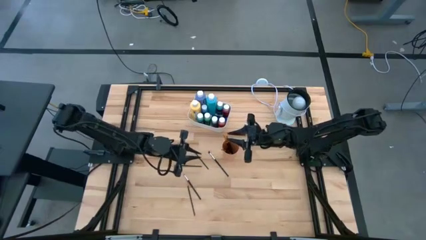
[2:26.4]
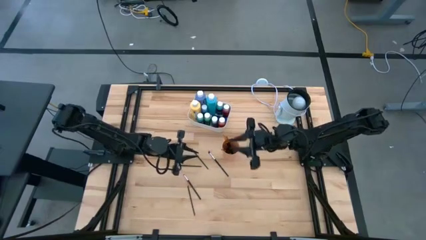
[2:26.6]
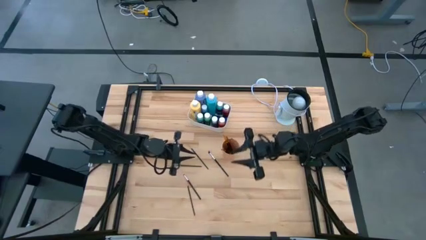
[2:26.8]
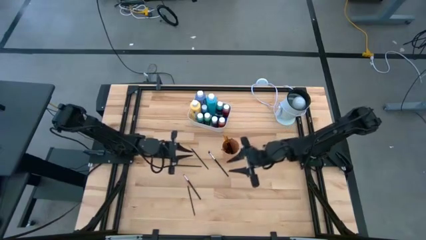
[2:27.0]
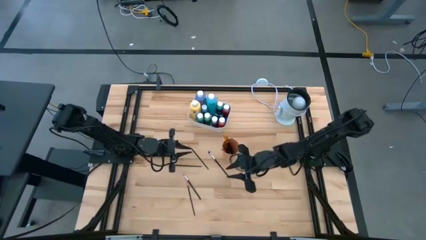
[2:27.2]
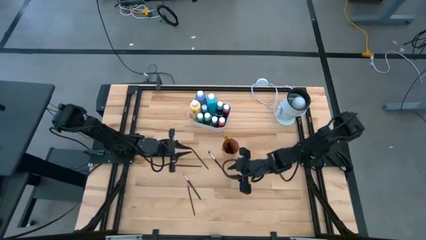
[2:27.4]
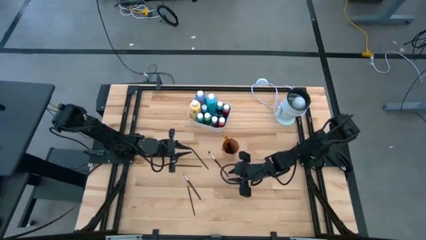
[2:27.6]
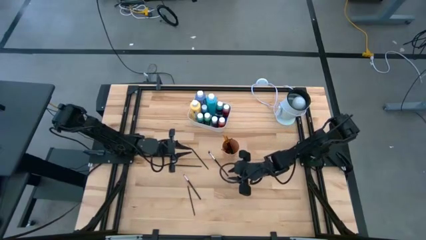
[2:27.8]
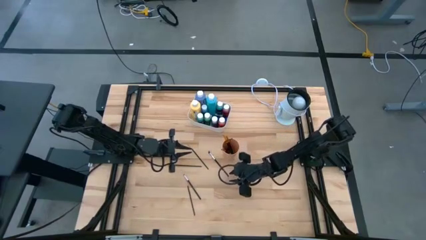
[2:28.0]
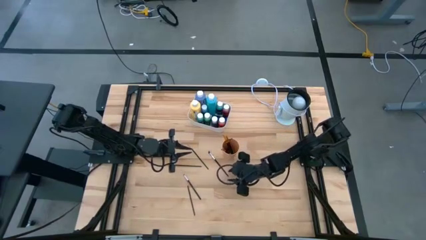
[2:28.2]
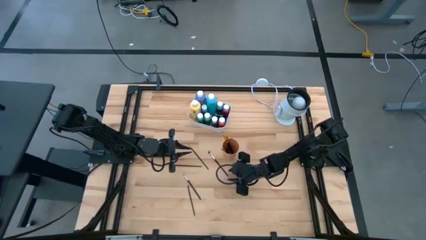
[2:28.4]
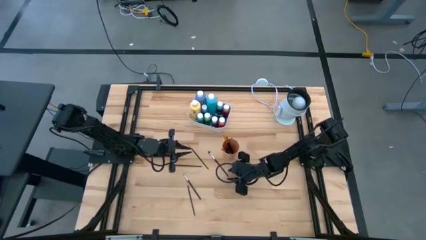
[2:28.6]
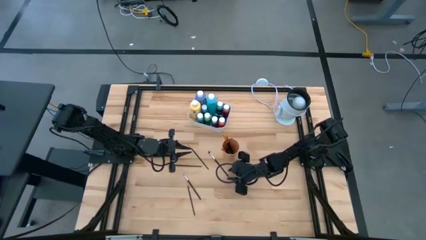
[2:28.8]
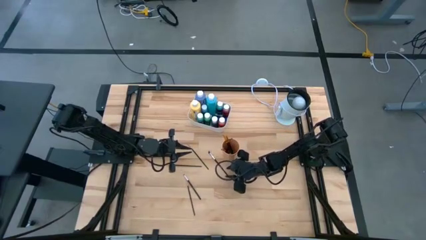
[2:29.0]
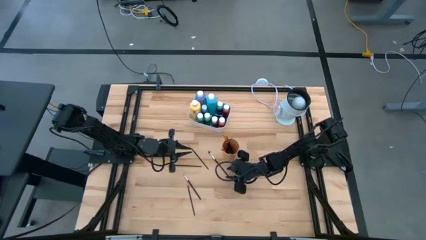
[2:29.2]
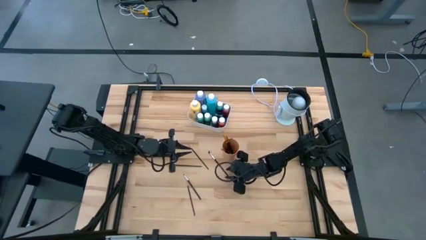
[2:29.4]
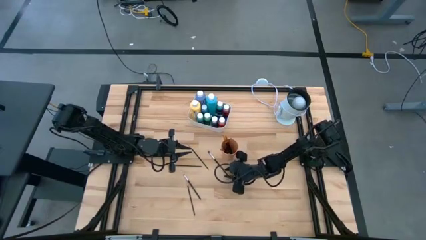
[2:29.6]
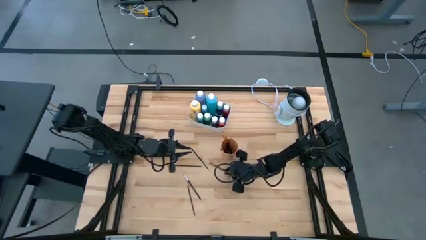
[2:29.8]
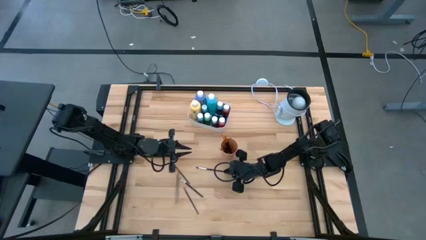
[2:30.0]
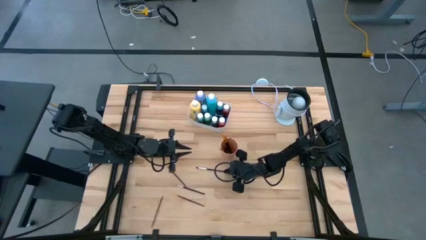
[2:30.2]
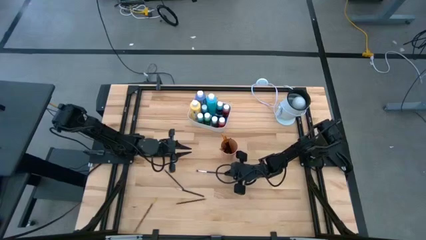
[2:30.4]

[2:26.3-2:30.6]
Task: Pick & Place Paint Supplies
Put the black paint brush into the orange cup

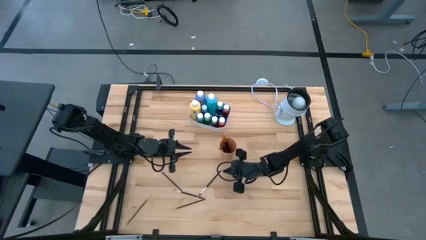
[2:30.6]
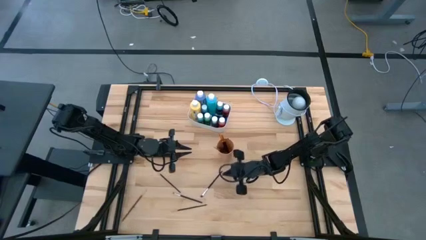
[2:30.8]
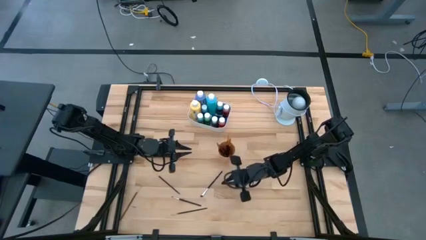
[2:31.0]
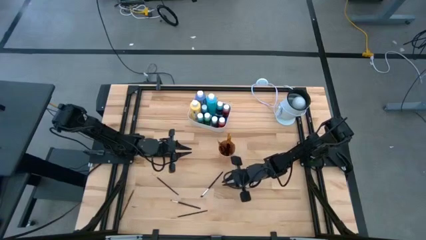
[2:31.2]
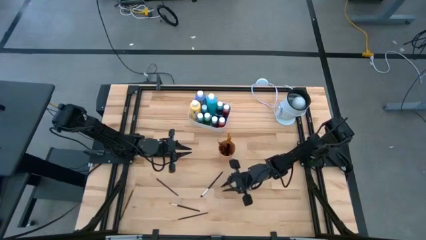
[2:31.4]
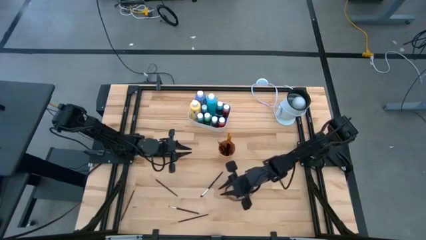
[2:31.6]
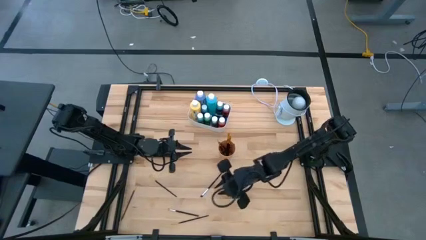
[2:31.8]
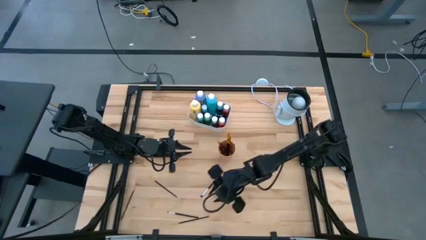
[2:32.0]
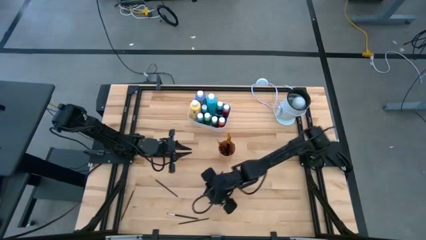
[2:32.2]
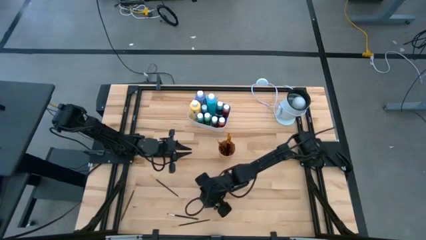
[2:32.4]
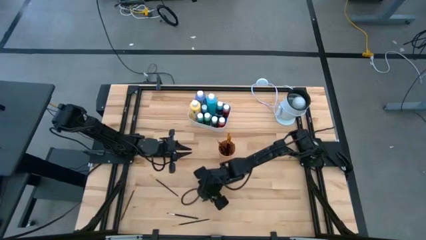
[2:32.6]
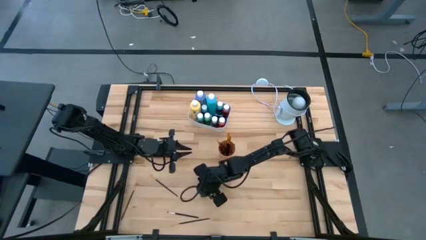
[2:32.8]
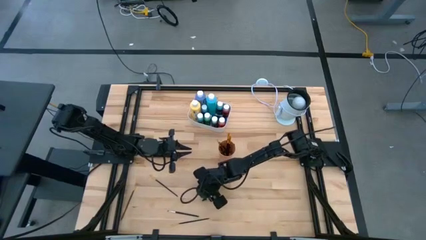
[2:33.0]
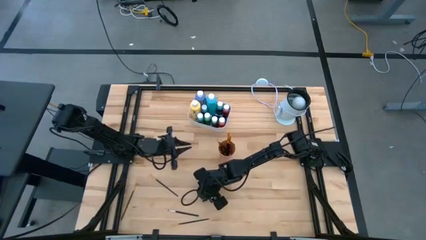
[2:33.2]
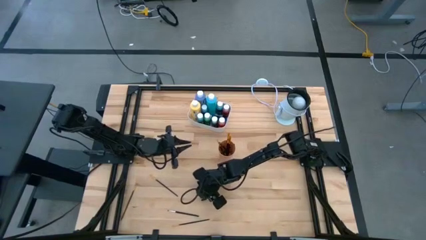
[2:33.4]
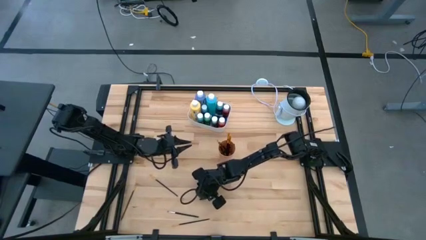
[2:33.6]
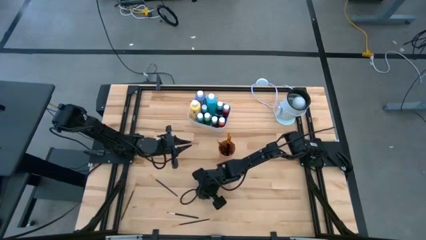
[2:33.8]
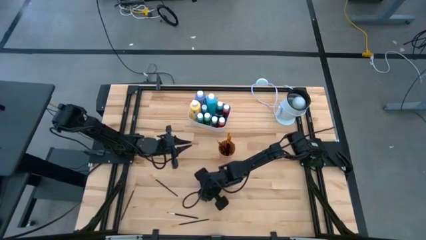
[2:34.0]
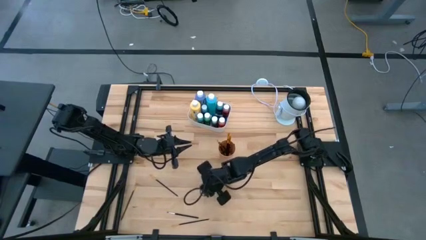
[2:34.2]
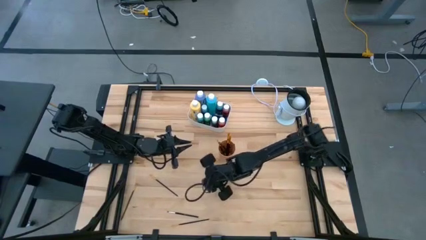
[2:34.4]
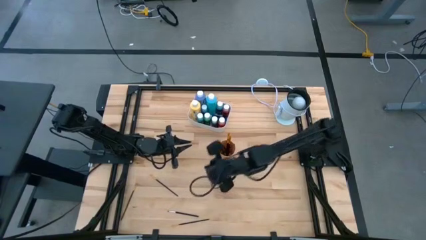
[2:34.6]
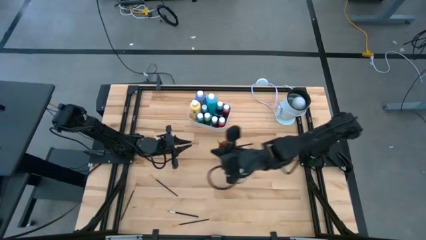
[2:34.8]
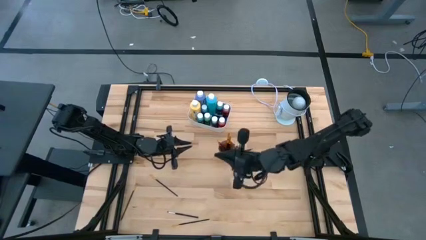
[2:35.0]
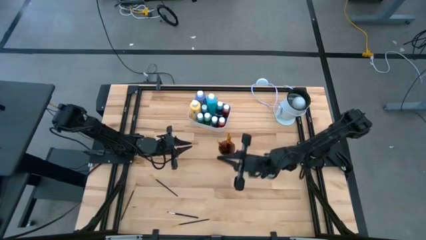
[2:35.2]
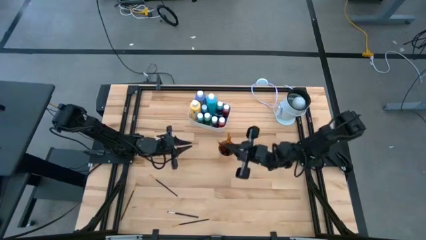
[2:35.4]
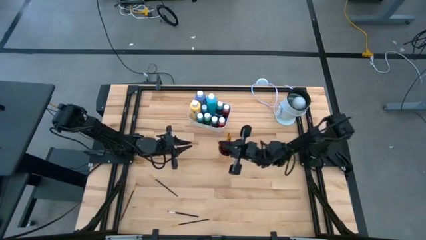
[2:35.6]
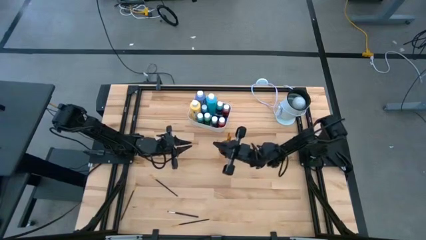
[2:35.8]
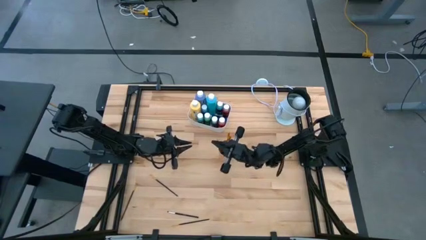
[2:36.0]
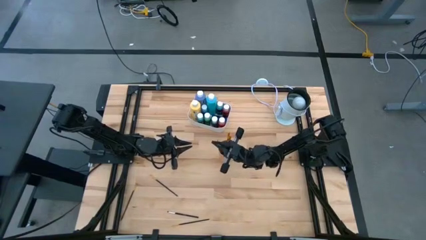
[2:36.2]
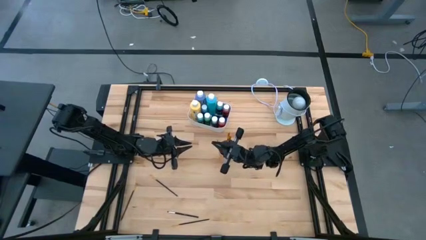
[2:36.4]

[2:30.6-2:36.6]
Put the black paint brush into the orange cup

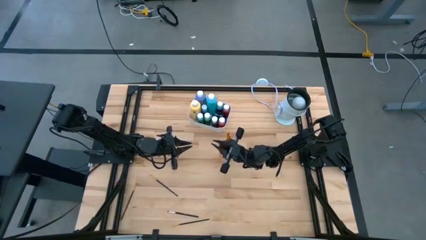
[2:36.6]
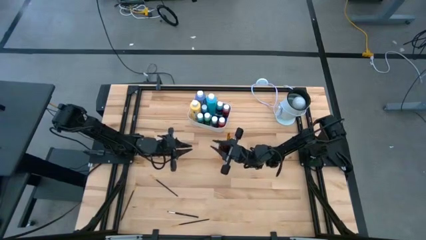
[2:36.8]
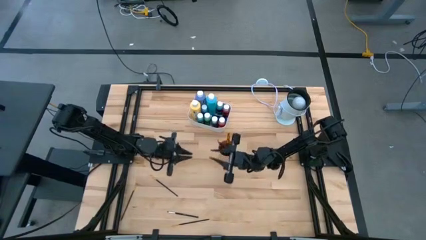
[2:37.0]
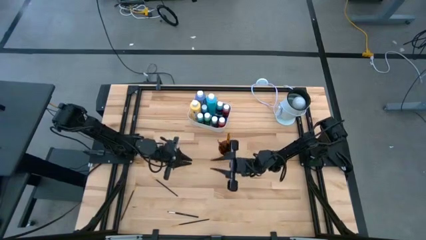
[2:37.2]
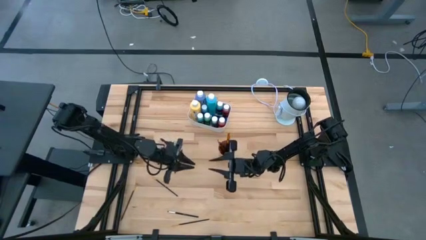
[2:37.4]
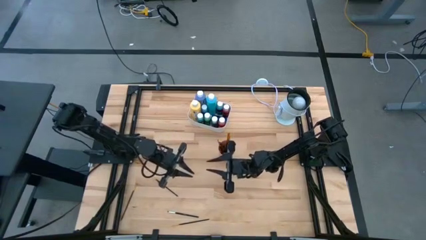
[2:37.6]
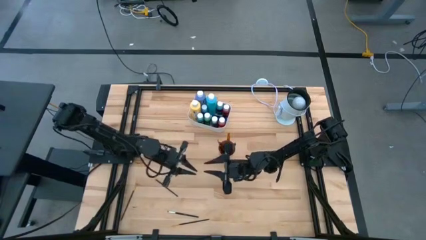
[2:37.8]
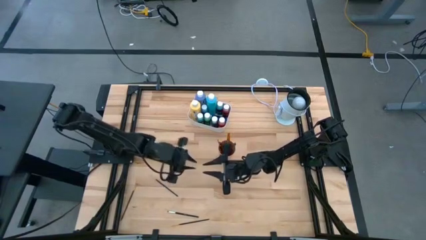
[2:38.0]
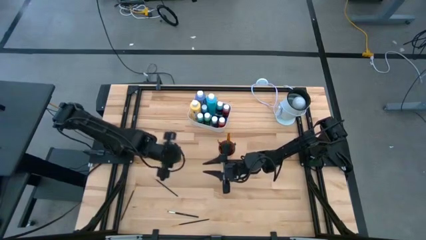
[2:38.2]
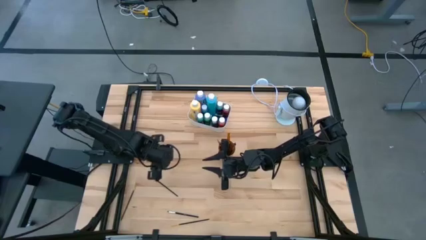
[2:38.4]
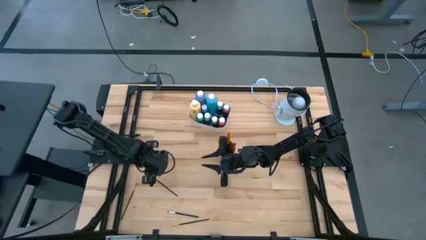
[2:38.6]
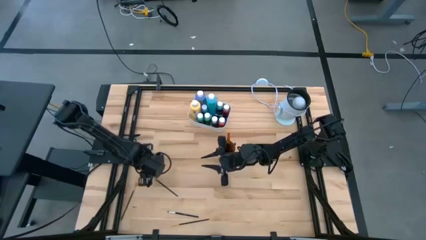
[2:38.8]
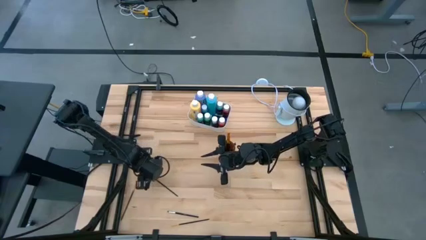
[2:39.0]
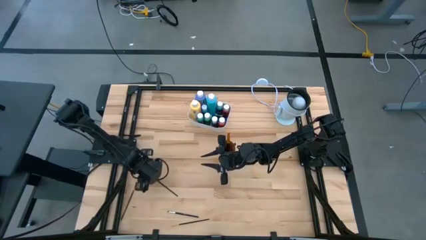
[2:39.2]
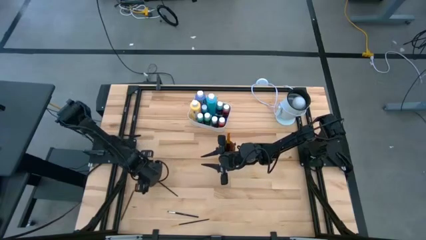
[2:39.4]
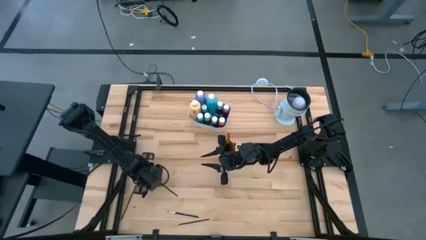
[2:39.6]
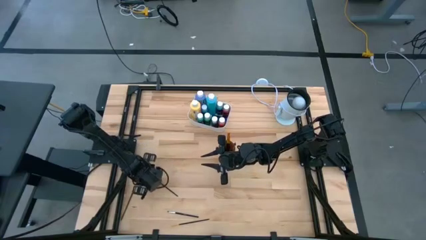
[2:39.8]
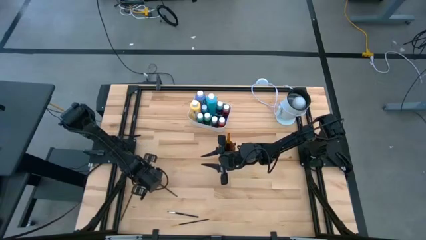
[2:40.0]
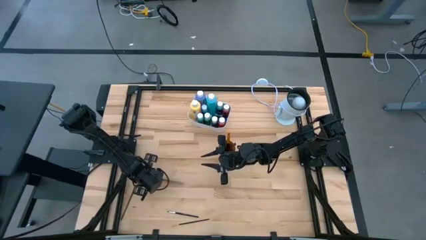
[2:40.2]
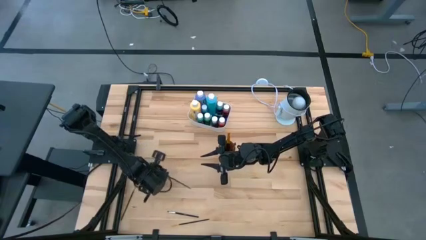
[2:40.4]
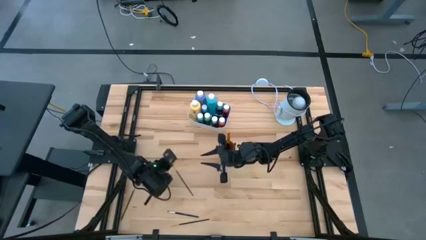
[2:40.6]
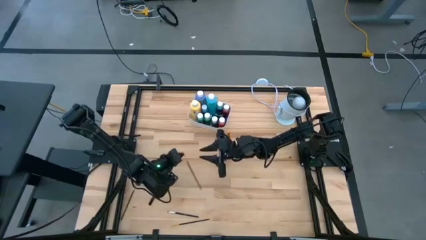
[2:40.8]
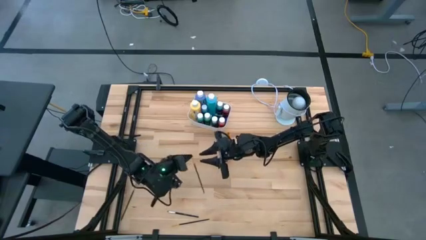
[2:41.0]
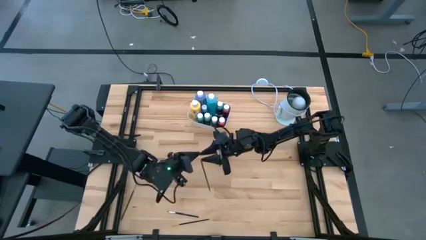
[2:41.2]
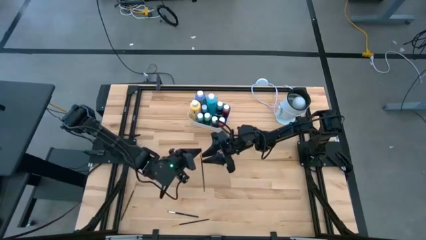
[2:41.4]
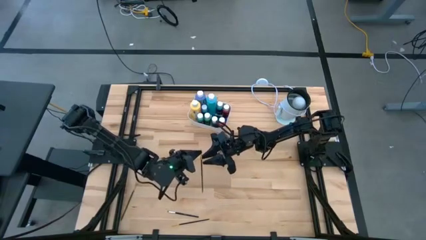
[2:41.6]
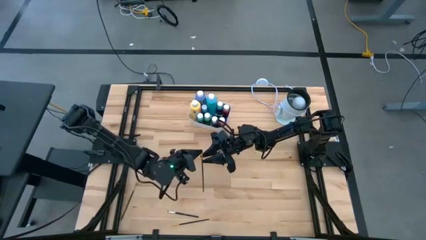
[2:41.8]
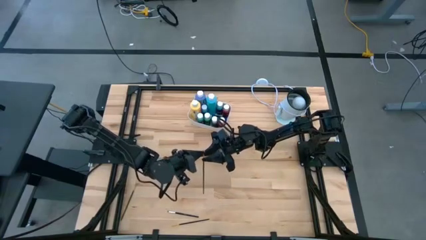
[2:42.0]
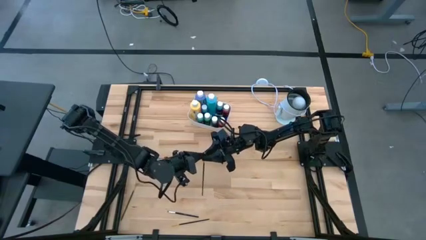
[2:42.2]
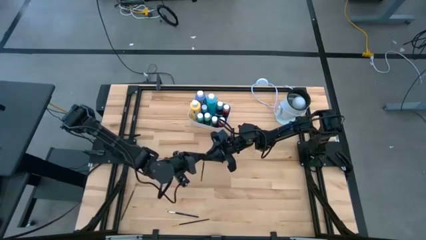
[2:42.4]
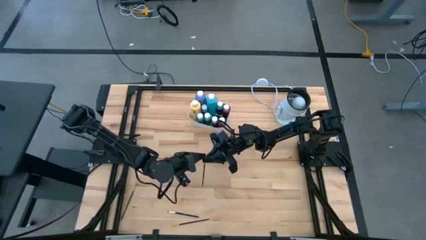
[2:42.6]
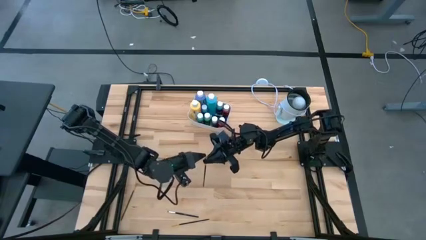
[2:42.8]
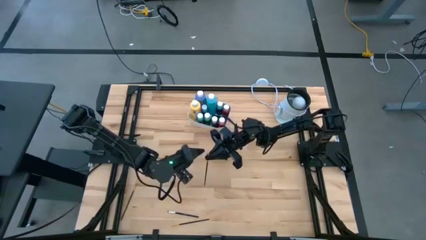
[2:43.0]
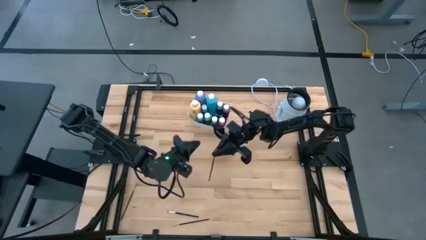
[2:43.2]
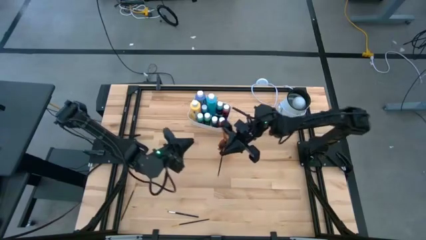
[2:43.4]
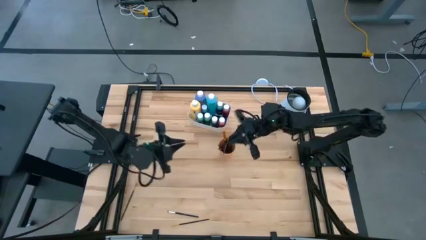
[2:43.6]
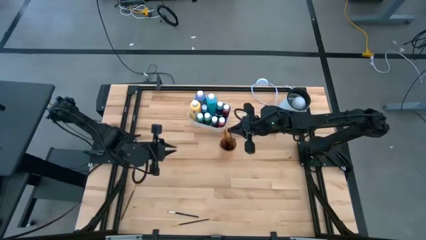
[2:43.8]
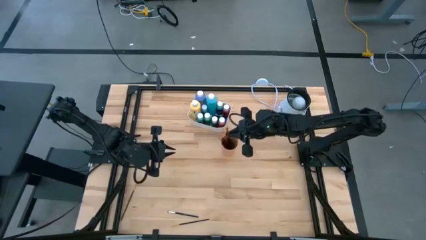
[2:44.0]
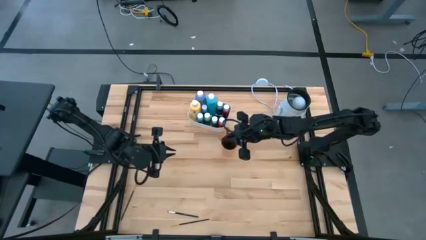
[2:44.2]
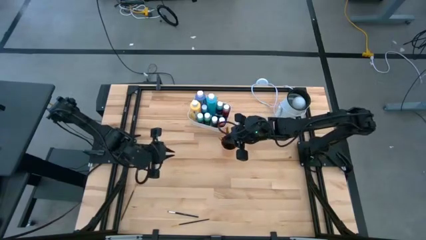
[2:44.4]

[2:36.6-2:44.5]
Put the black paint brush into the orange cup
